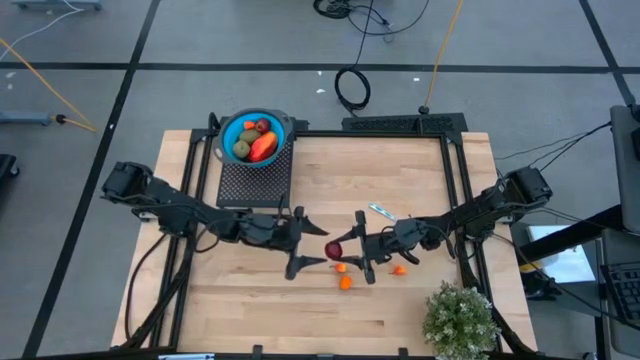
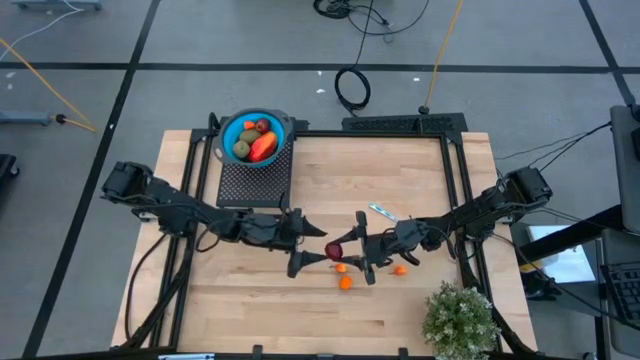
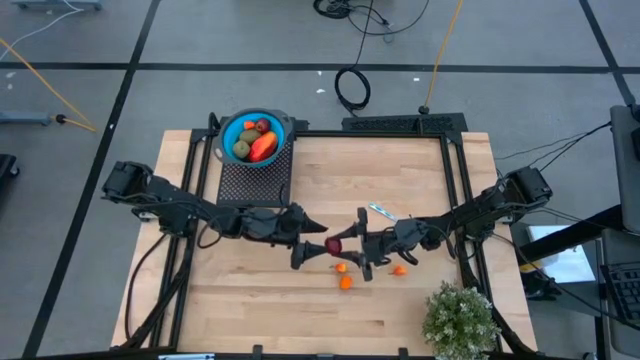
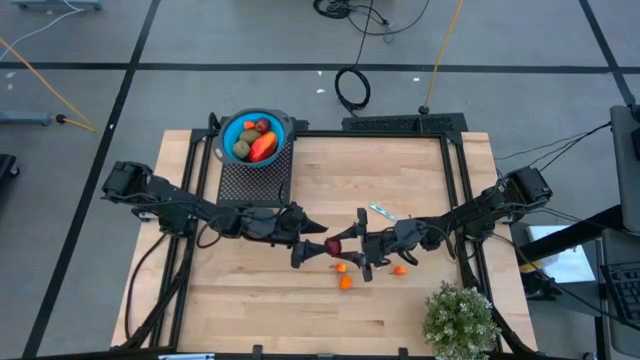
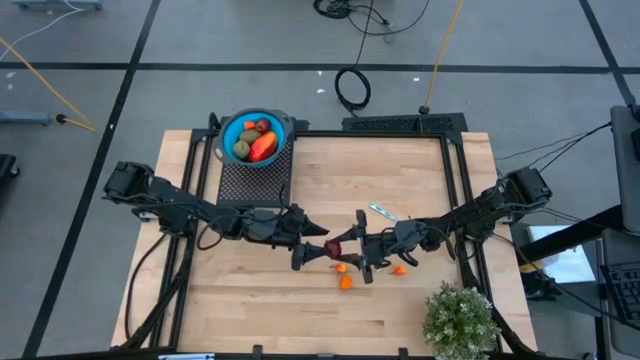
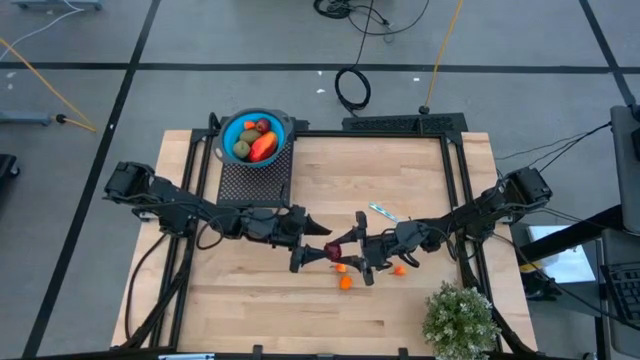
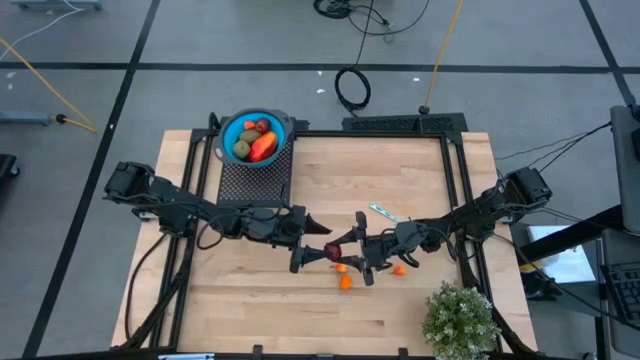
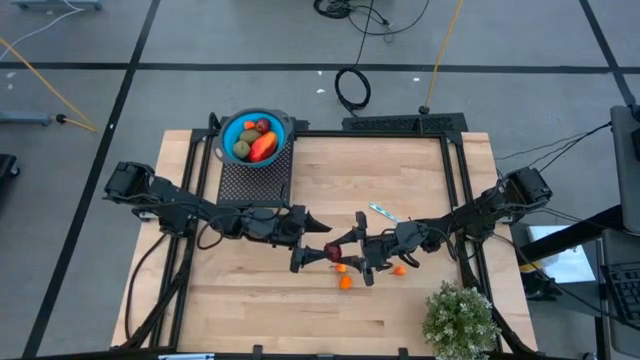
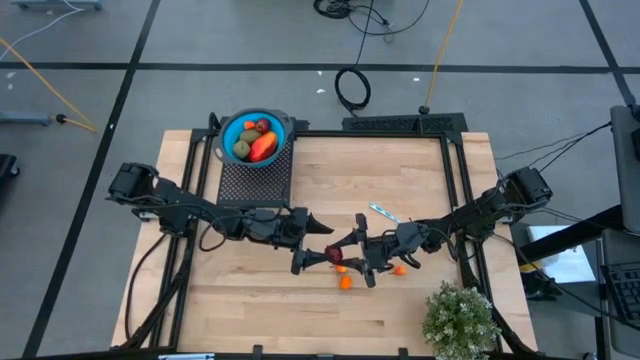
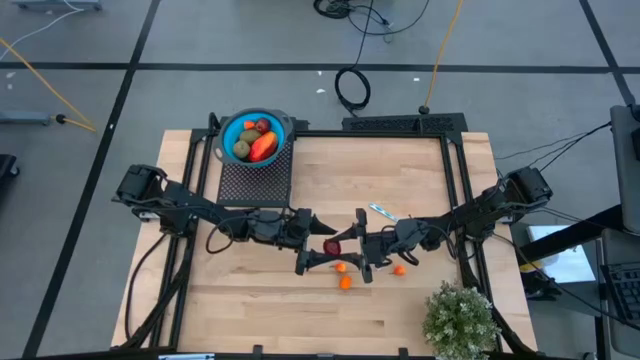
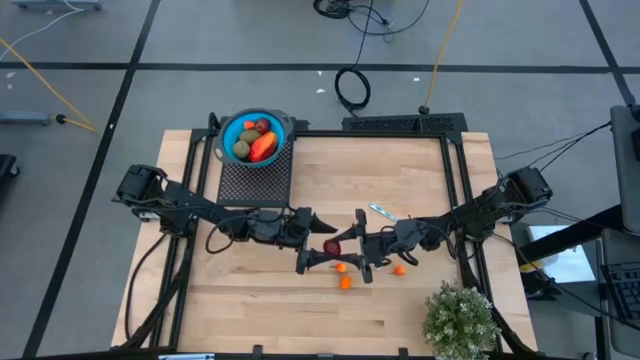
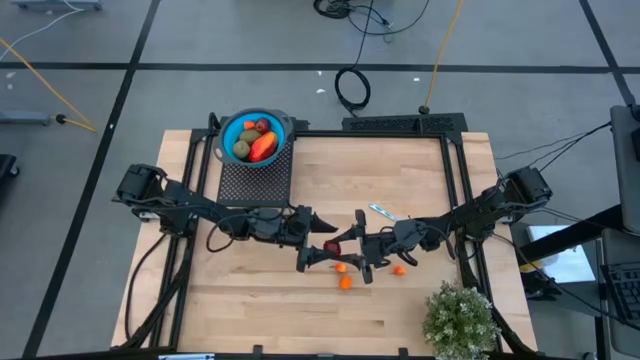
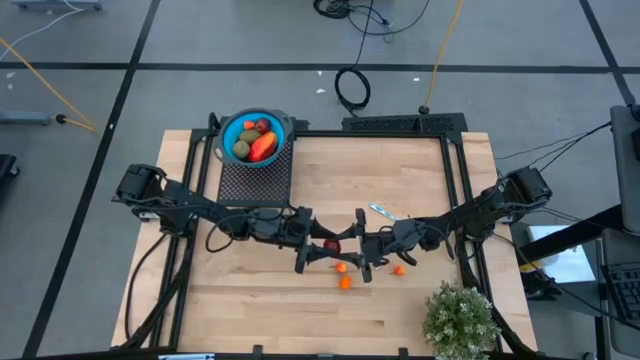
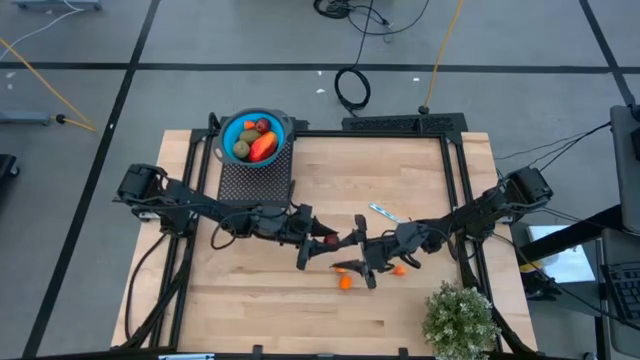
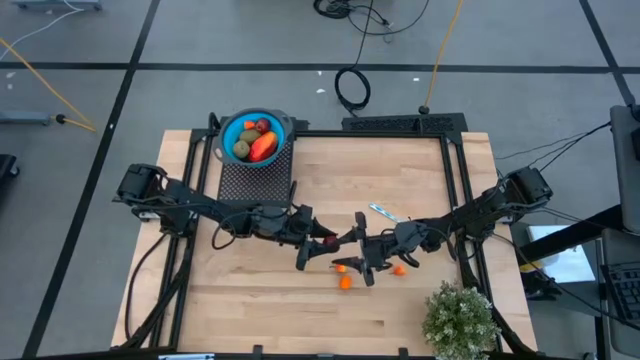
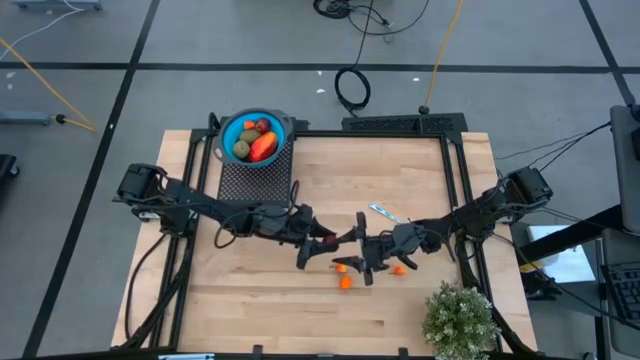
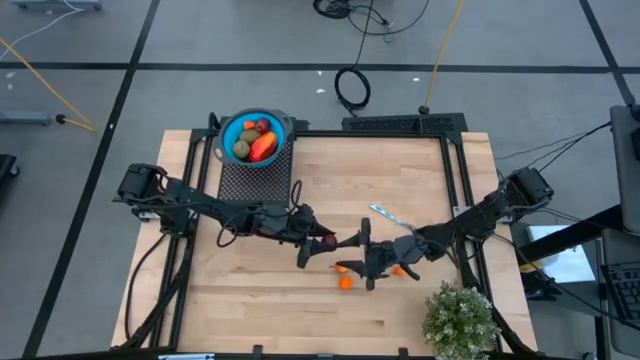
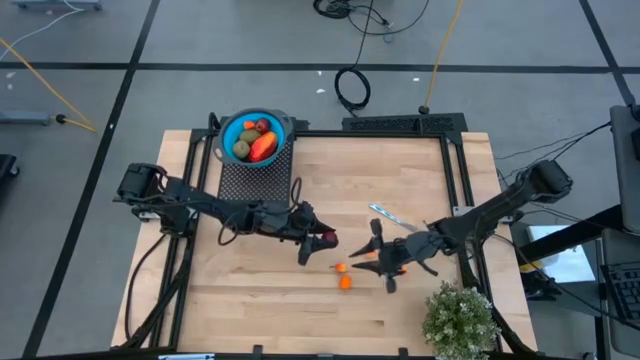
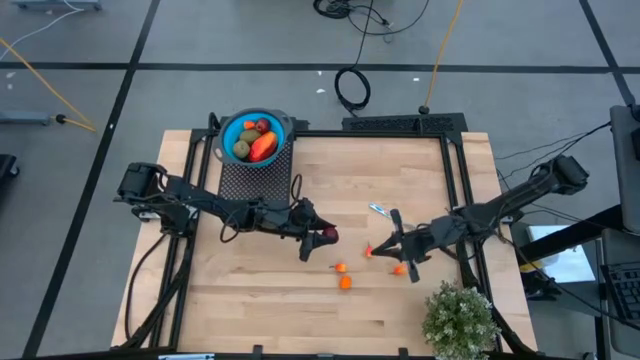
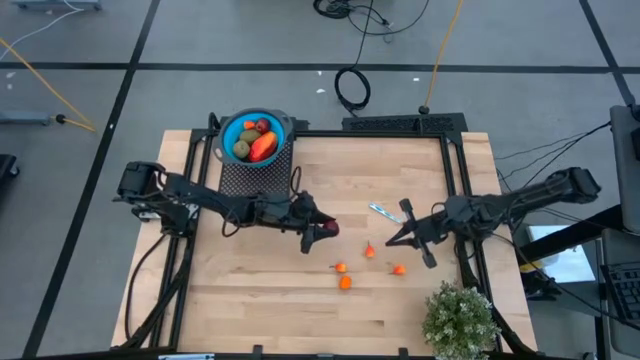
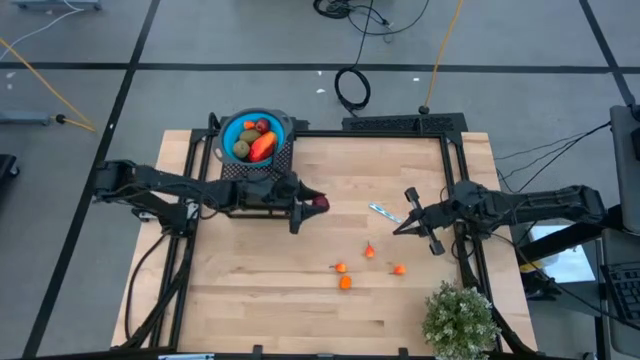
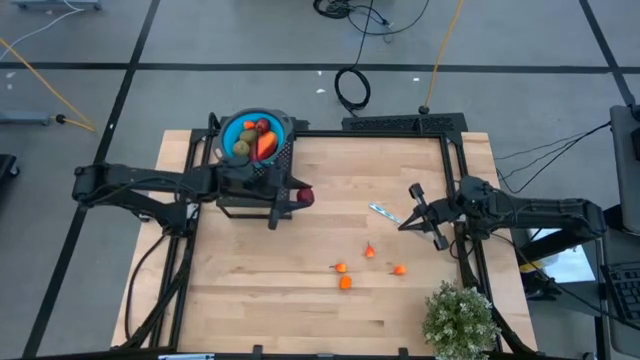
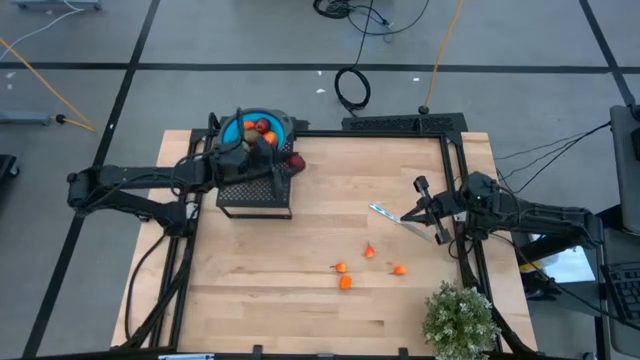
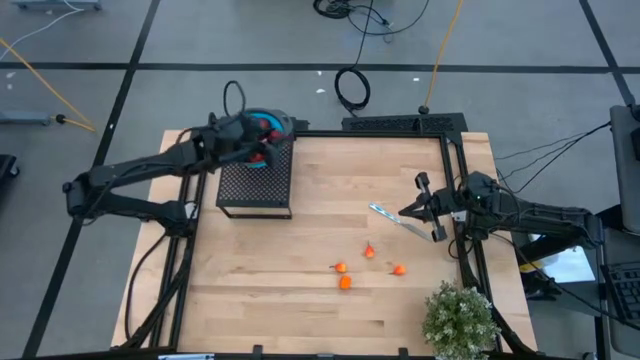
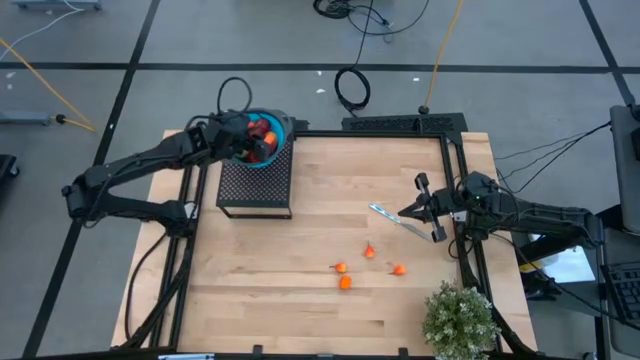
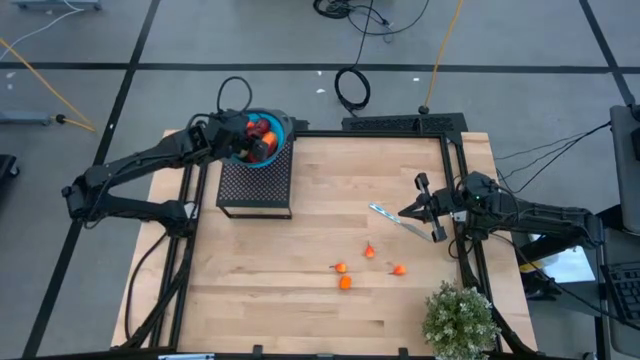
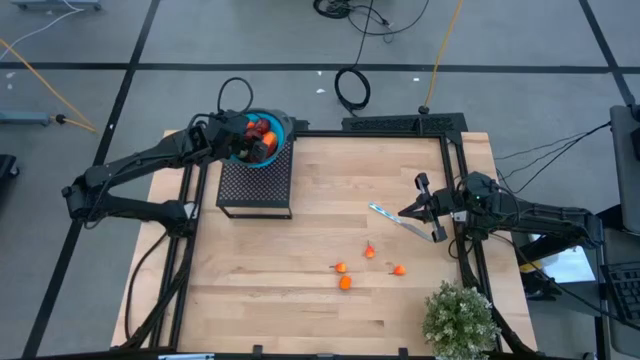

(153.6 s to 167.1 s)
Task: Pick & Place Fruit
Put the red pomegranate into the blue strainer bowl on the shelf

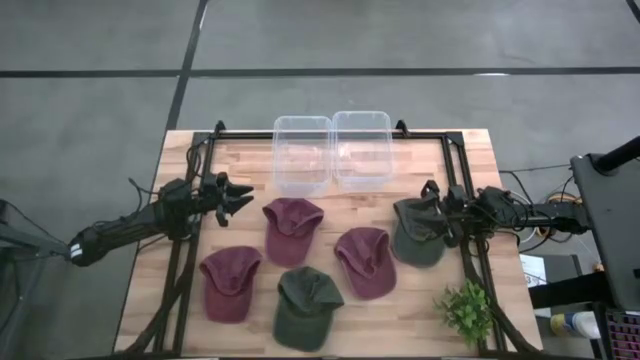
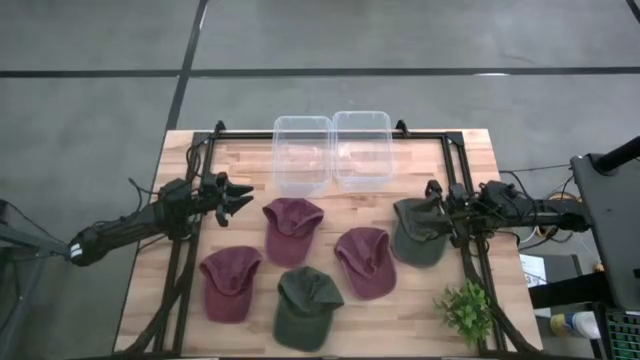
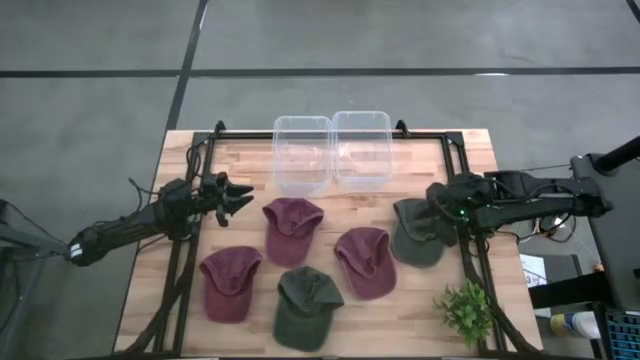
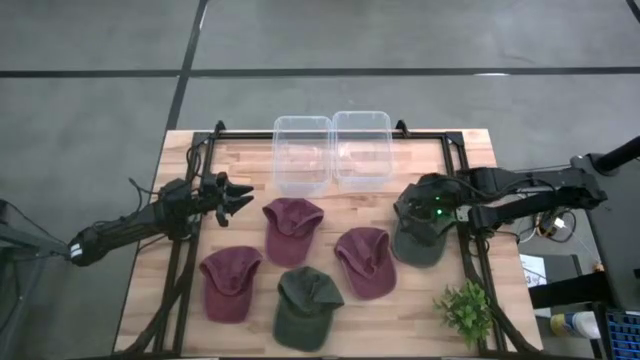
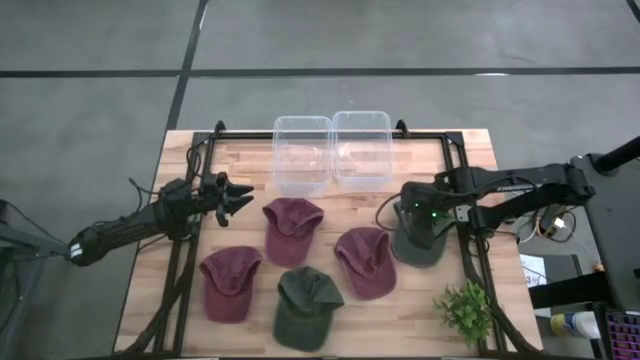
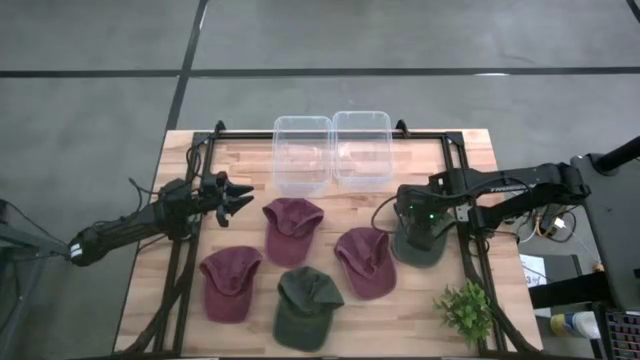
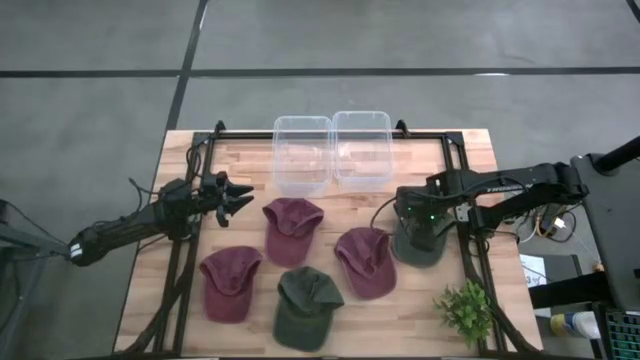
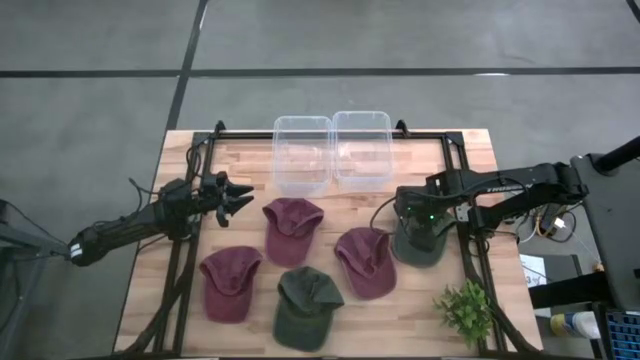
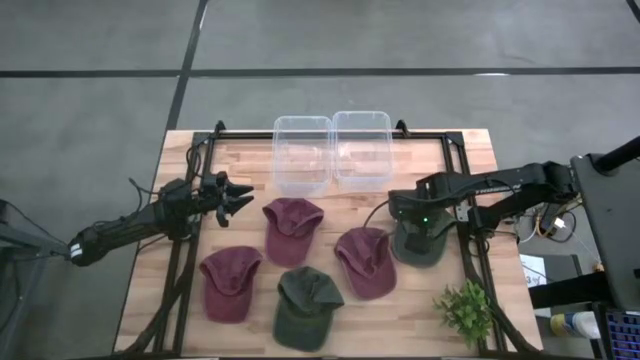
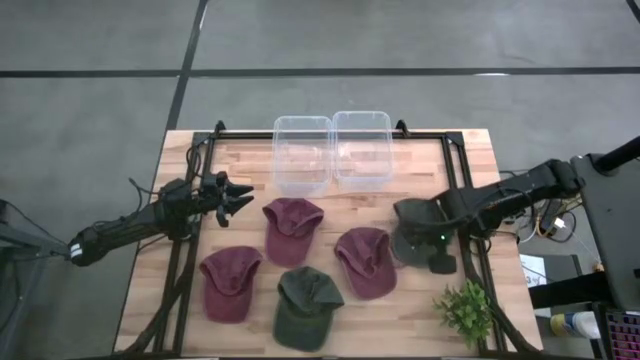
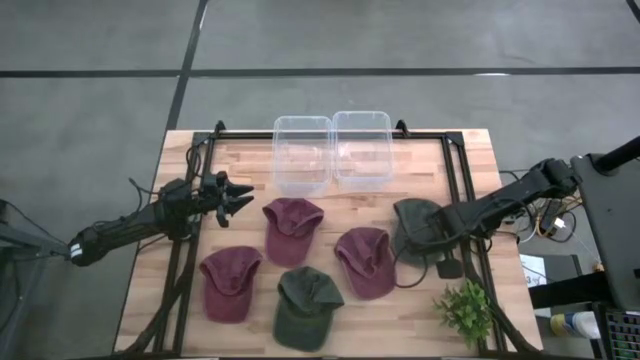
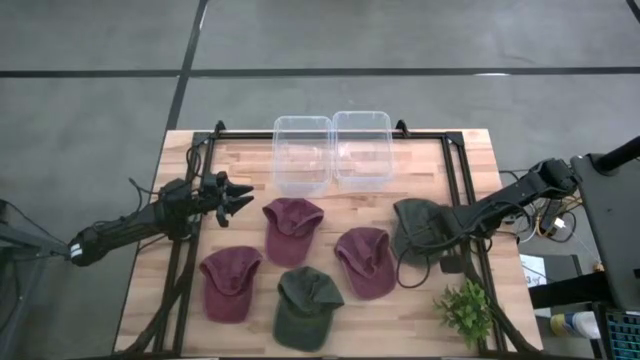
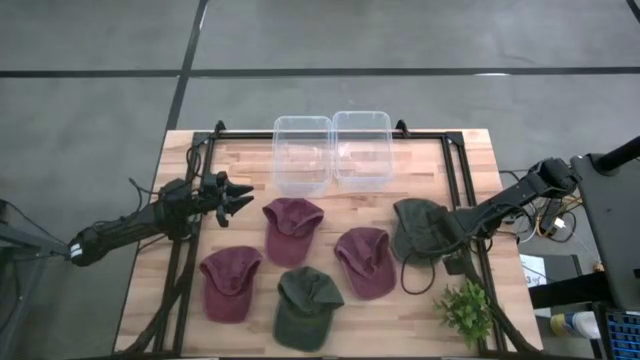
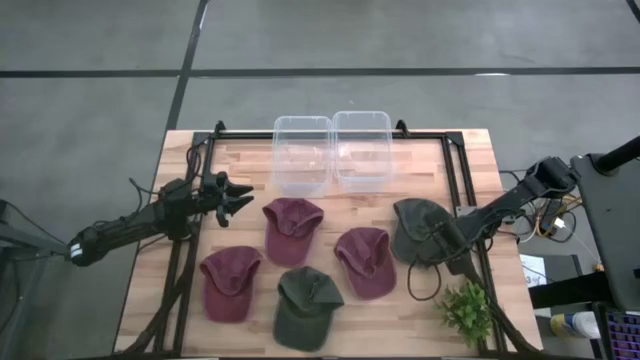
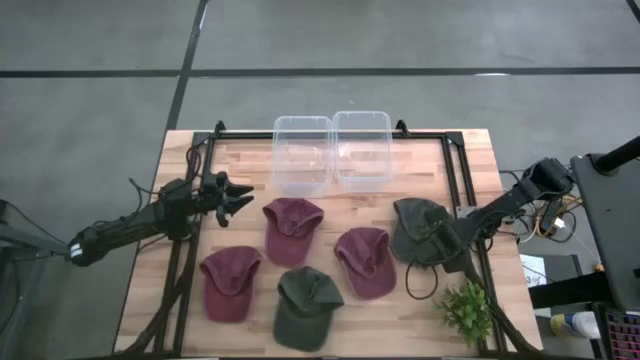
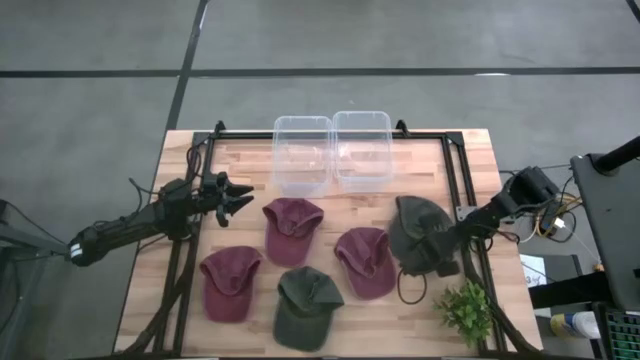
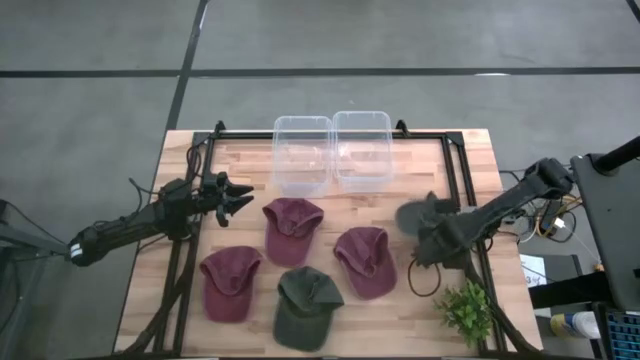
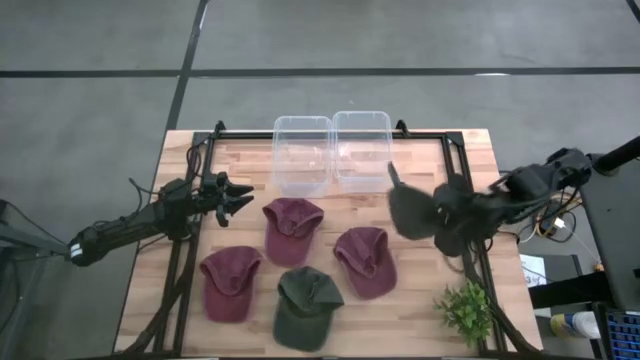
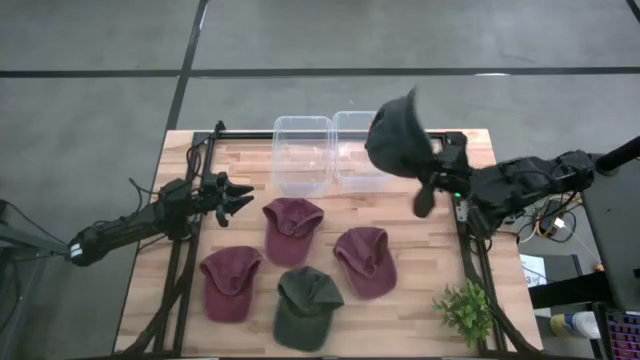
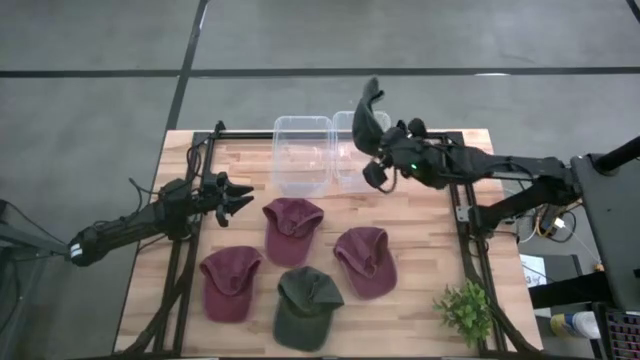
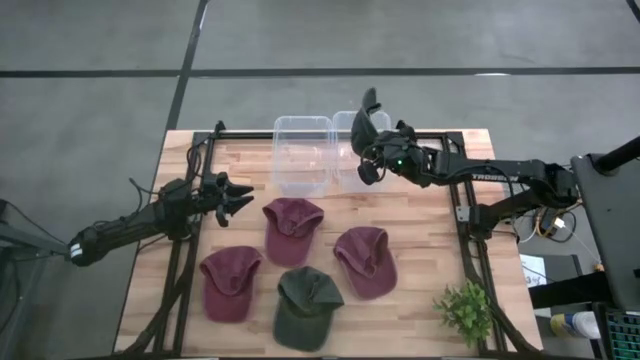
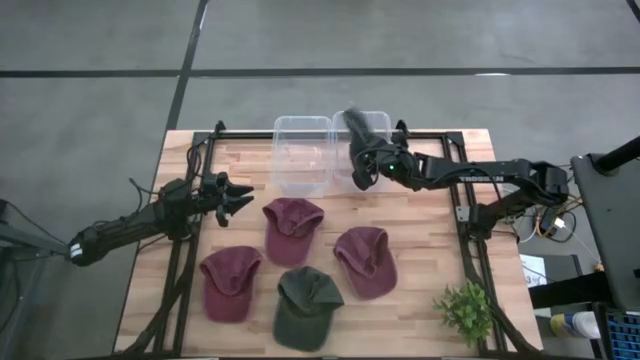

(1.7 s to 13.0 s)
Task: Pick & Place hat
Put the top green cap into the right transparent bin
